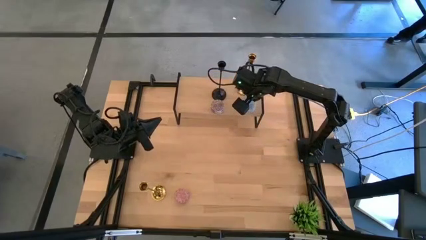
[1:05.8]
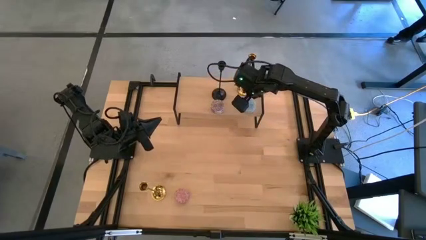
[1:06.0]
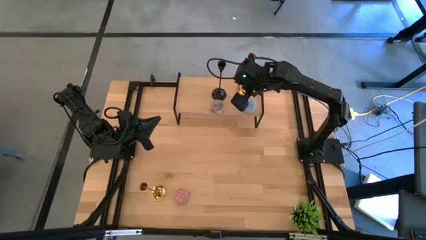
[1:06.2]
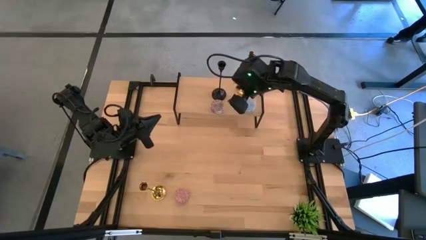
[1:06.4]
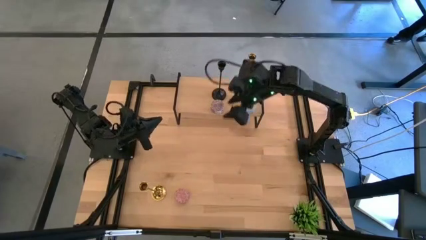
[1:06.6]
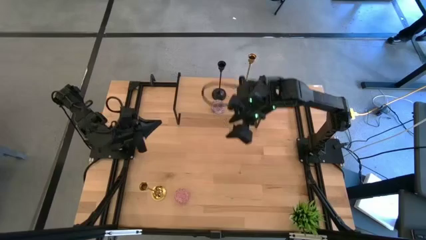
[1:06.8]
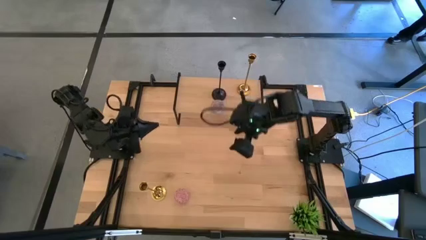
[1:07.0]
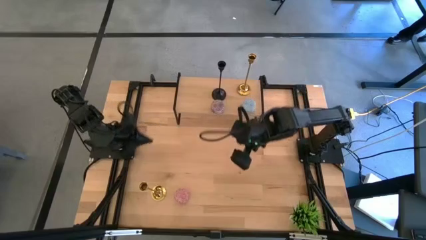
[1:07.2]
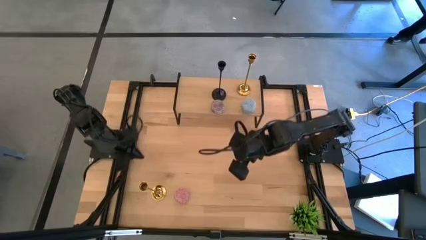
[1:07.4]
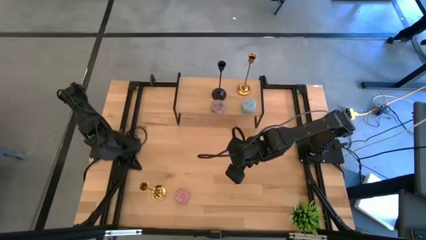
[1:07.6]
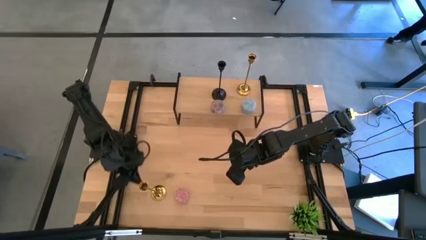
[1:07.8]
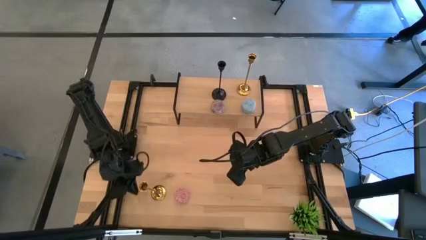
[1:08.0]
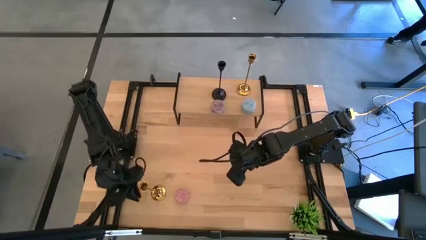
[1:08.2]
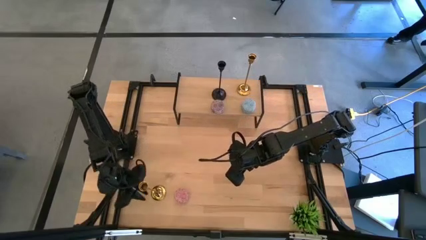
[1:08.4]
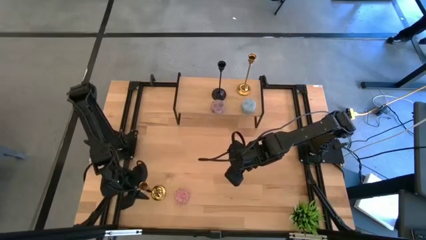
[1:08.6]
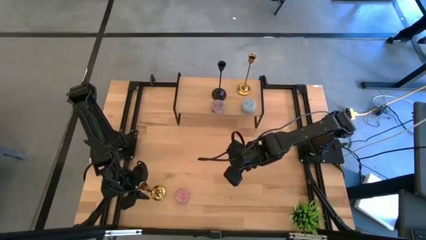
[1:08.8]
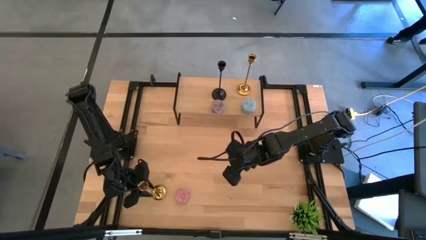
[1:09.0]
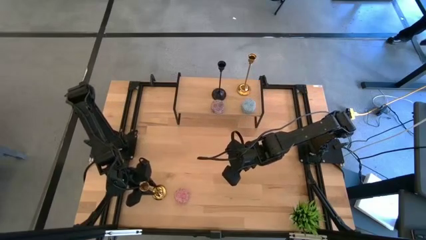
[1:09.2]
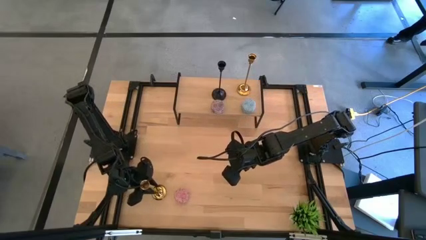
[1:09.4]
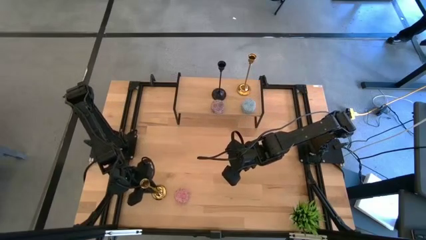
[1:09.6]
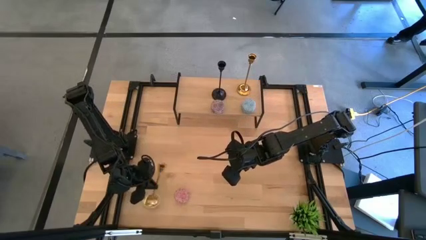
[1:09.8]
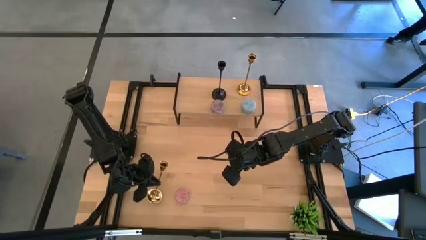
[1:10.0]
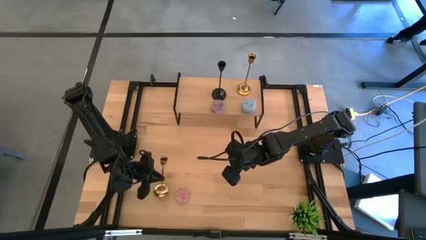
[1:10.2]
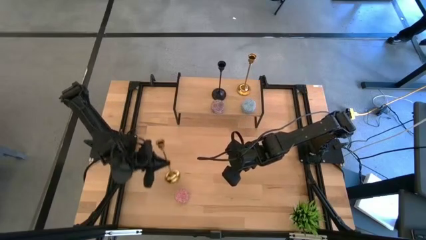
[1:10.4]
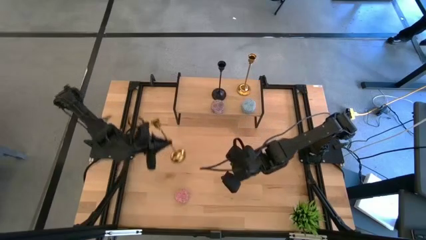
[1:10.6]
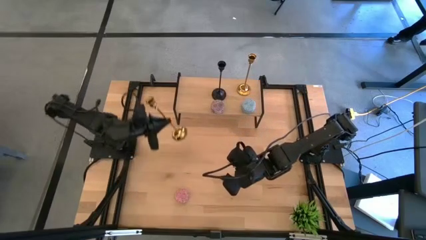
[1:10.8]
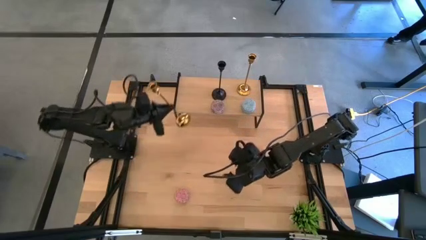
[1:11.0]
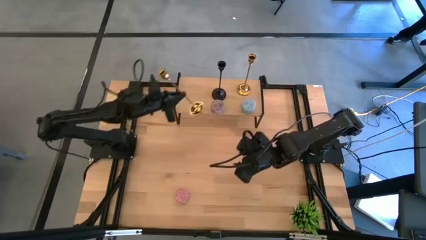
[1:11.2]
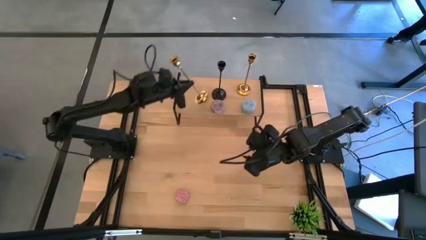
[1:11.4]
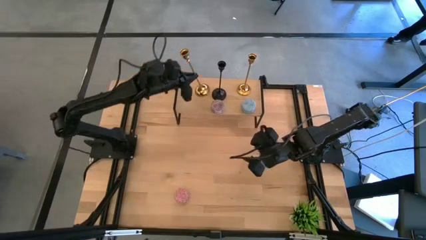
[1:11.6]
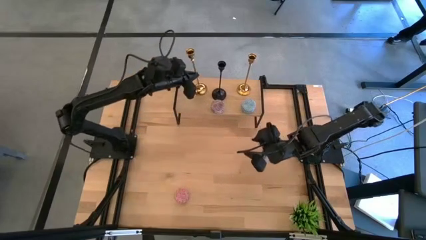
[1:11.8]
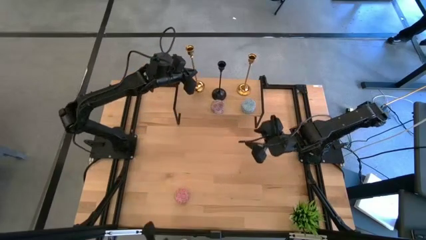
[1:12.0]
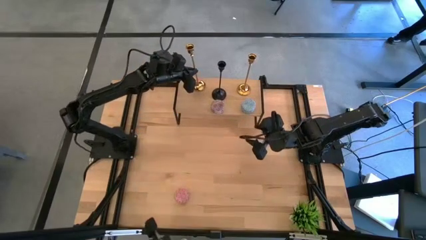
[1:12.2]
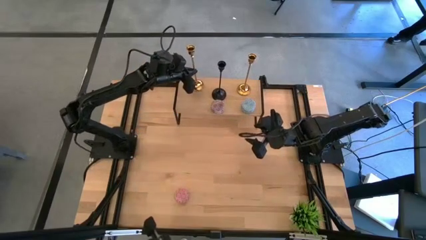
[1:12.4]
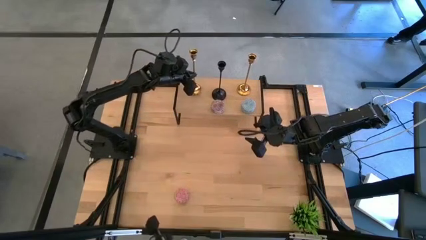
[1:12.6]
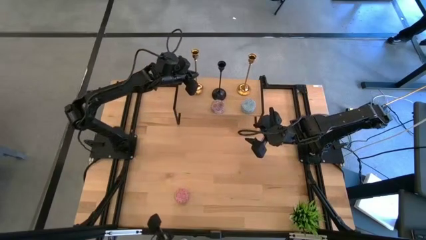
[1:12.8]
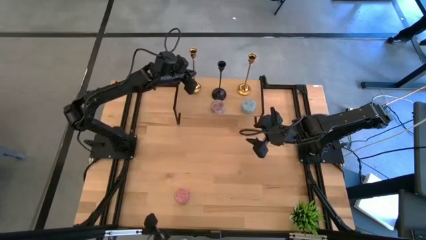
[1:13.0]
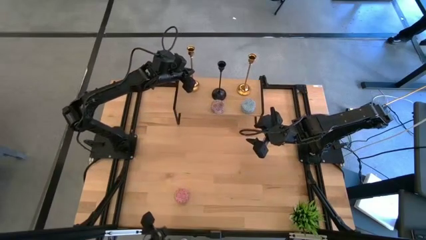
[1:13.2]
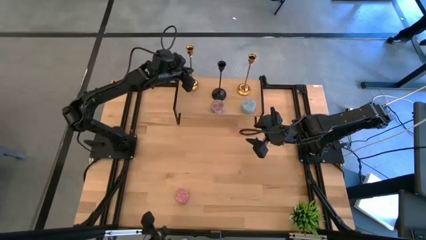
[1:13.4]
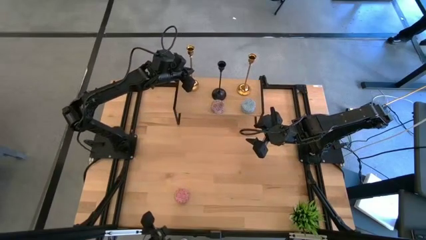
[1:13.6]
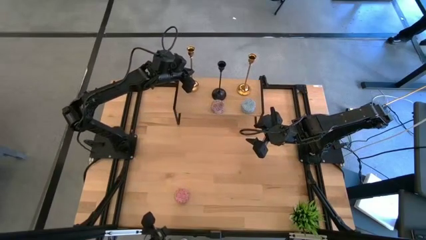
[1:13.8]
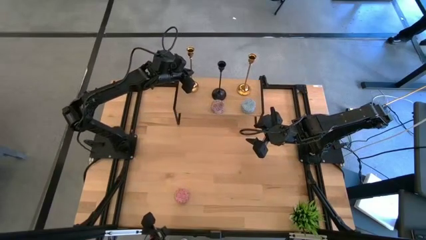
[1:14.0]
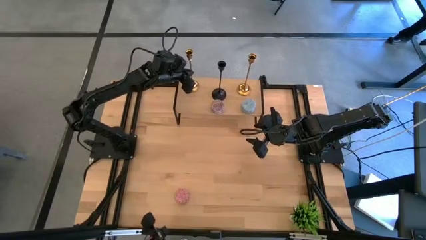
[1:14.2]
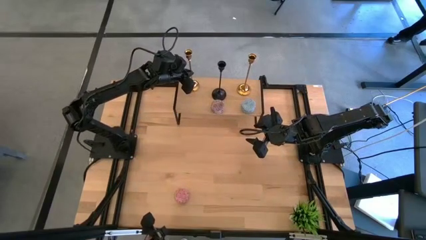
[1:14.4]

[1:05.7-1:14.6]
Task: Pick & Place candle stick holders
Put the gold candle holder on the shelf

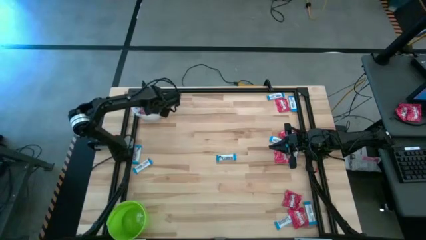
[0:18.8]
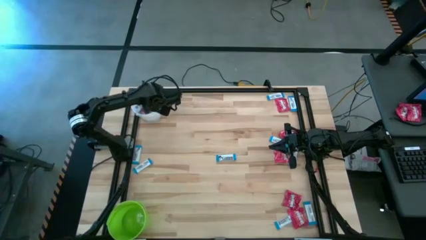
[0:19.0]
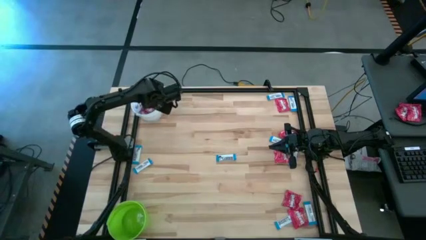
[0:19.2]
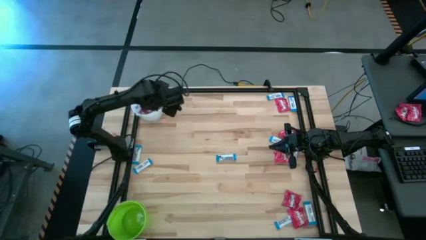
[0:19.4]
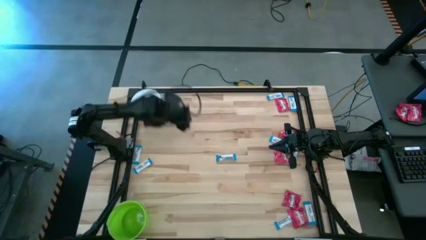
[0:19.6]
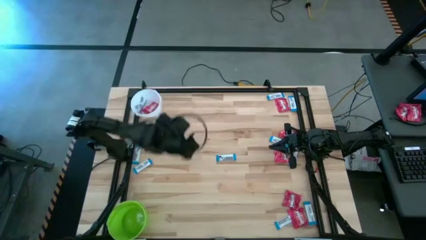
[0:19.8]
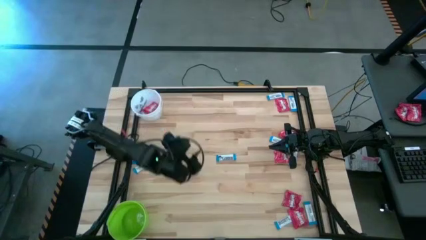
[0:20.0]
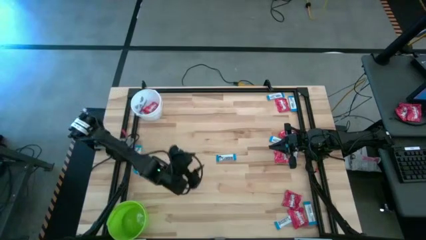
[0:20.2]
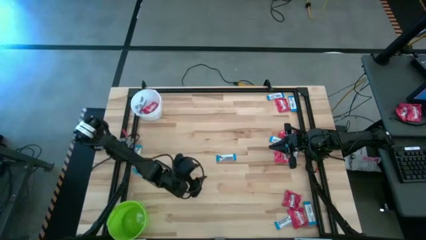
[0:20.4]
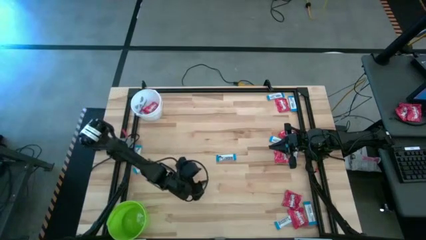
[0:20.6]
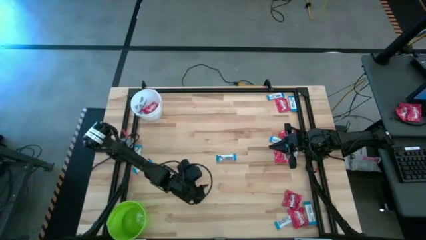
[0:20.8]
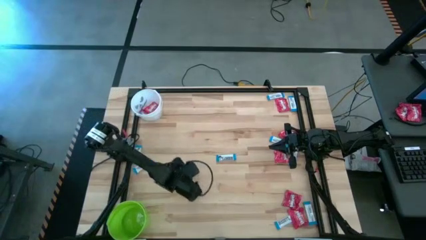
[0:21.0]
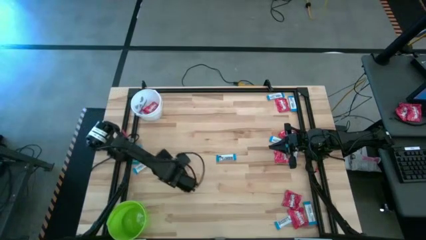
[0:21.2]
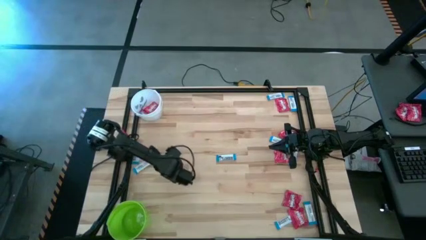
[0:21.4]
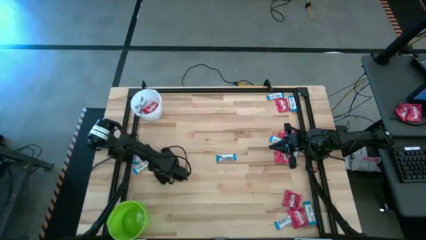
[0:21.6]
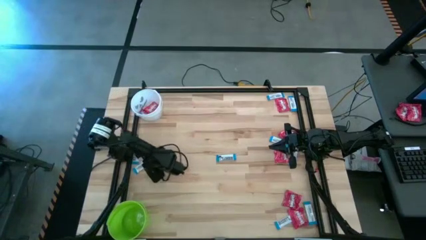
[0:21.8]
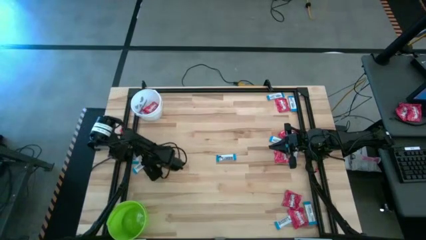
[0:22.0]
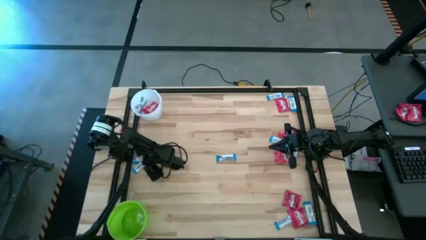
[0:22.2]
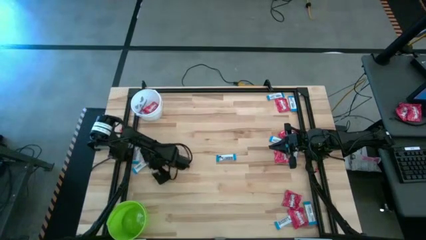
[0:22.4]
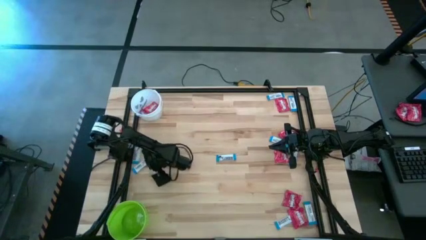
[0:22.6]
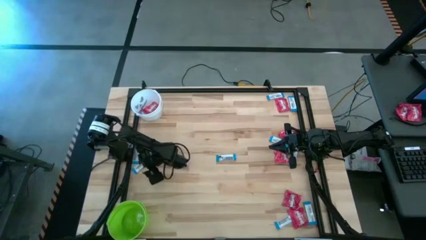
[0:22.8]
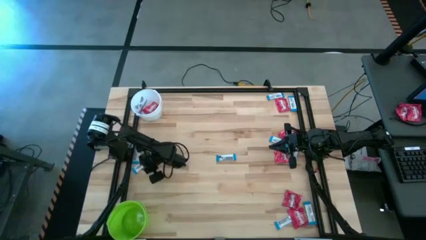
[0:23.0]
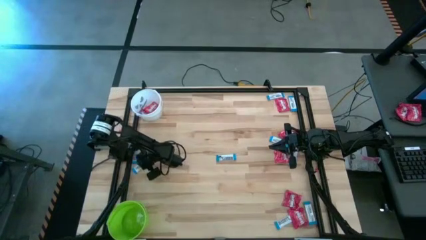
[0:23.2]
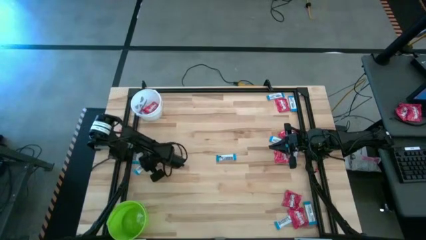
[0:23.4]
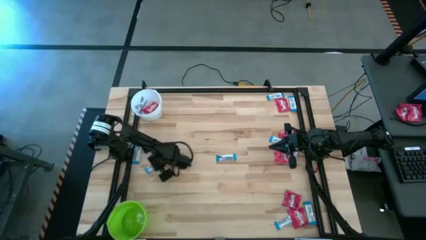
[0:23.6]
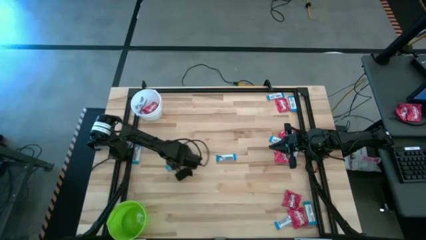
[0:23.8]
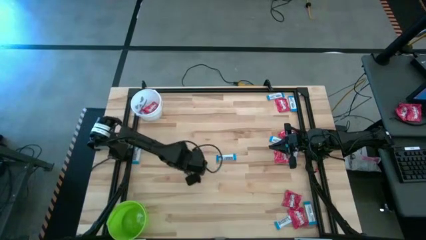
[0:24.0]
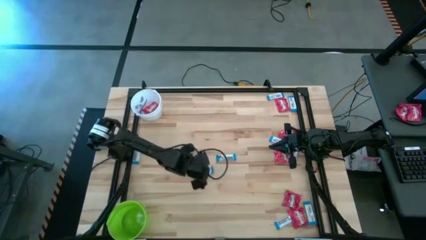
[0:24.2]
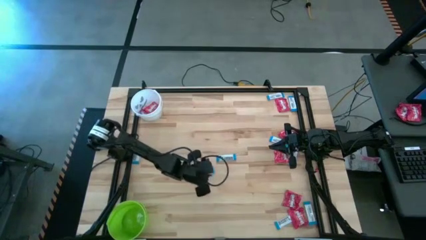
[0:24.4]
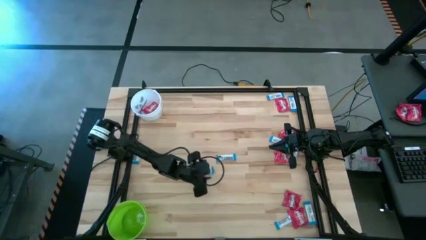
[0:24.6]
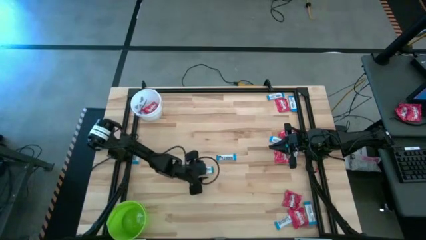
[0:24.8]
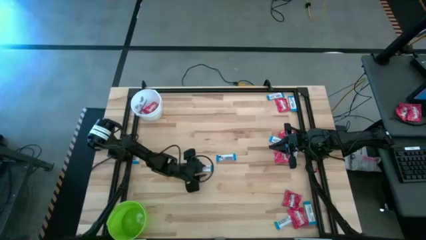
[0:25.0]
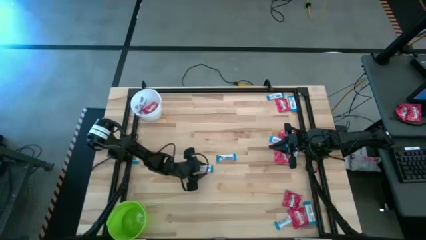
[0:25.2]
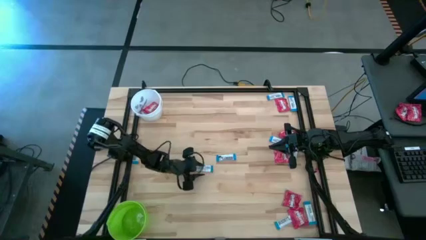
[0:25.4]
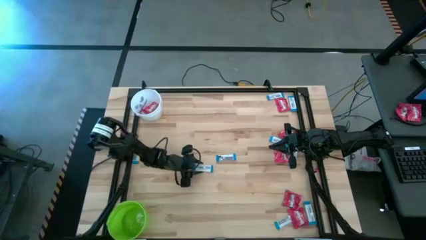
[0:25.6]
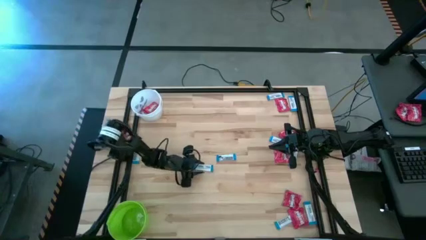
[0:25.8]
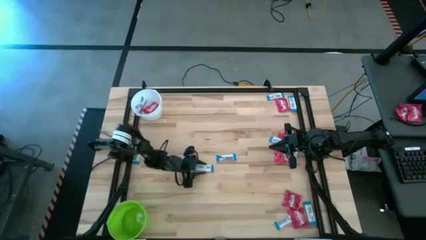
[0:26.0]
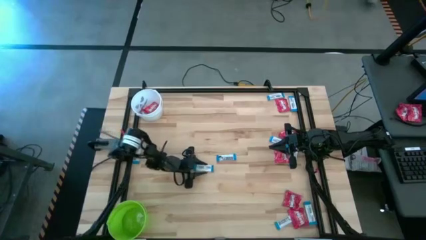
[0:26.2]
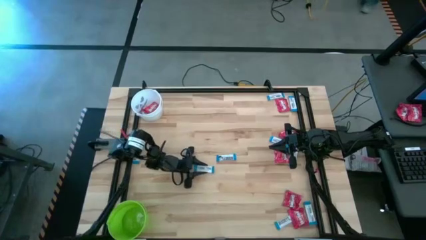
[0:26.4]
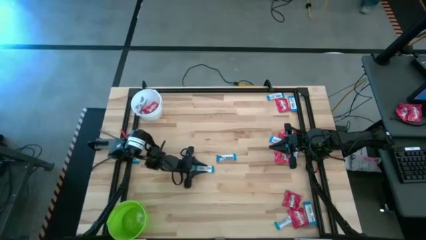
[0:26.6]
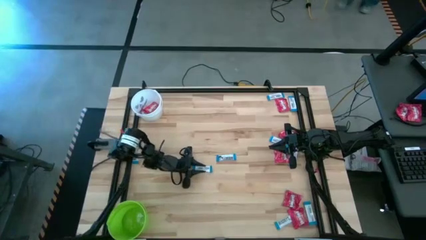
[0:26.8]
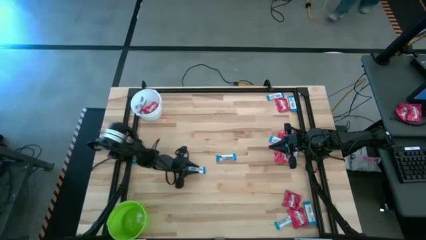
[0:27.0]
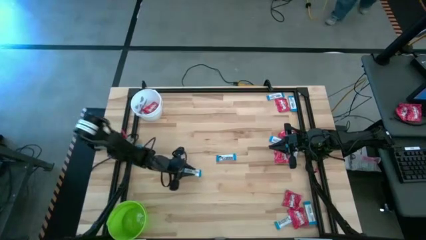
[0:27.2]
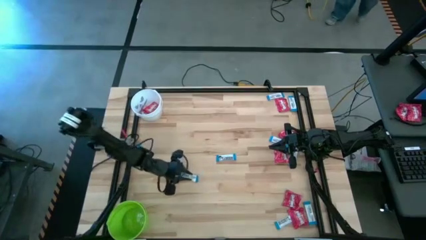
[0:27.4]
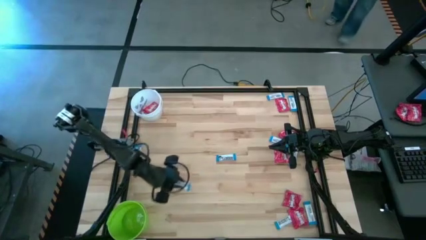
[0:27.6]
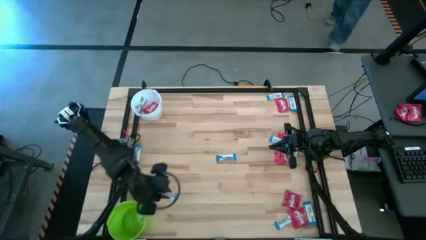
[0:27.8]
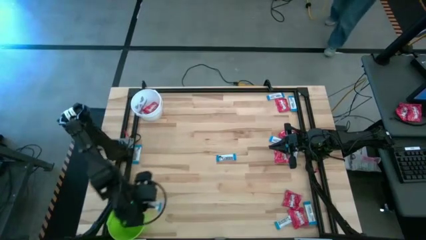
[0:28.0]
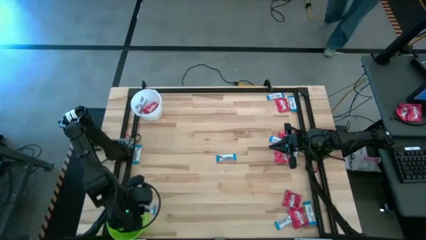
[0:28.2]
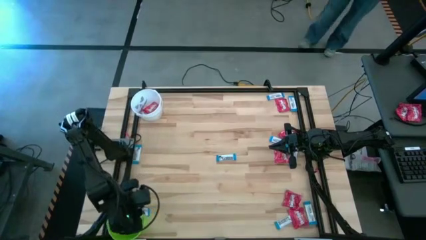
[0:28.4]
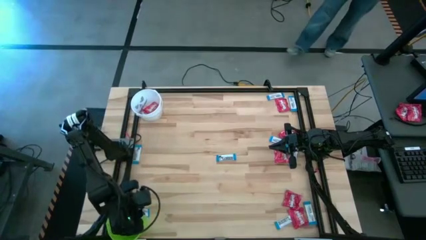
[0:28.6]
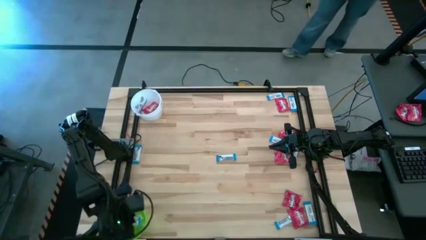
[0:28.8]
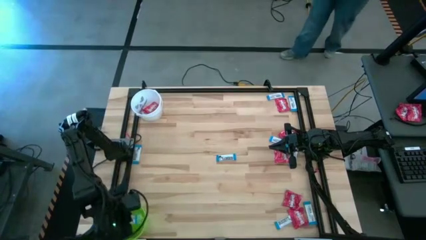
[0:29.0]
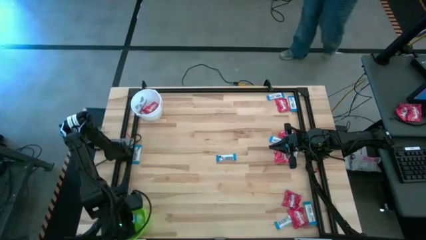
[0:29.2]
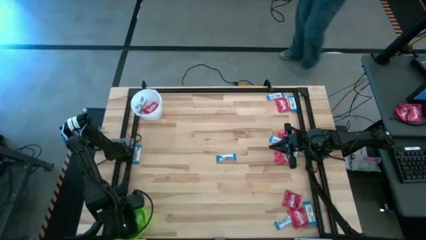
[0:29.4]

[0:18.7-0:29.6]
Task: Sort candy by brand, put in halloween buckets
Put the blue chocolate bar into the green bucket
